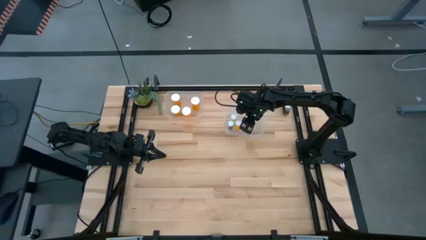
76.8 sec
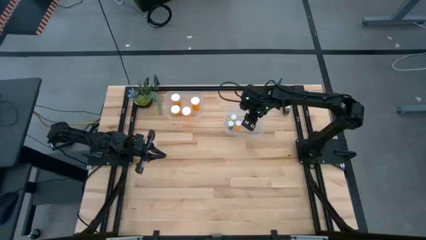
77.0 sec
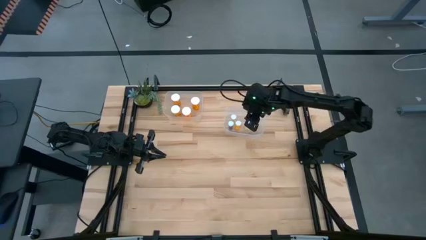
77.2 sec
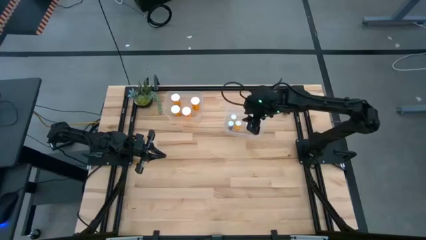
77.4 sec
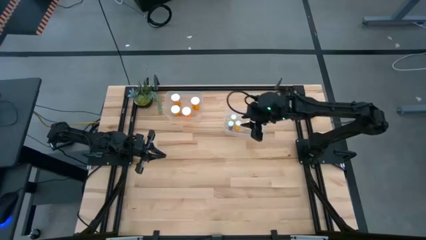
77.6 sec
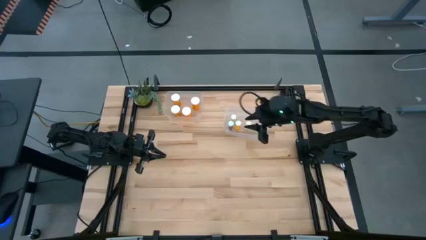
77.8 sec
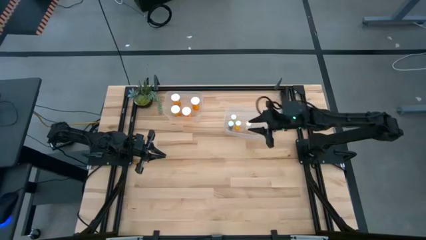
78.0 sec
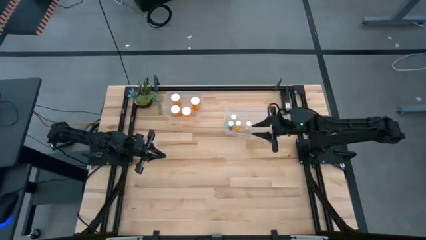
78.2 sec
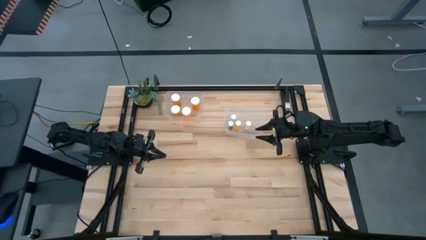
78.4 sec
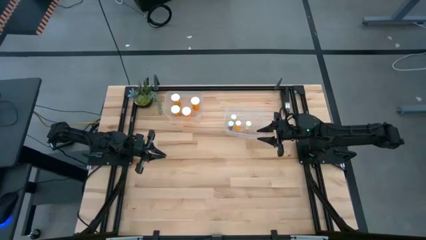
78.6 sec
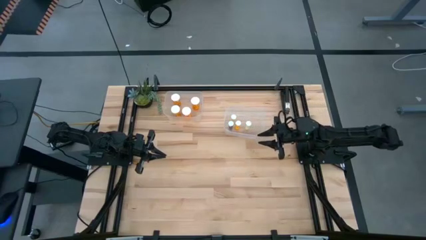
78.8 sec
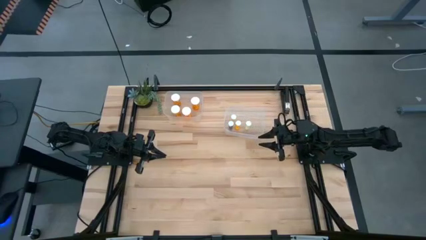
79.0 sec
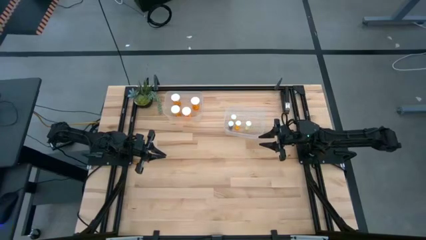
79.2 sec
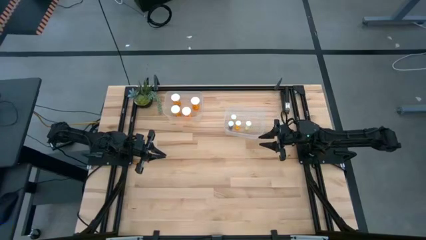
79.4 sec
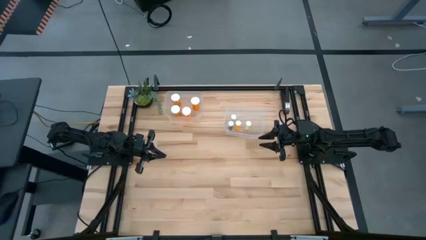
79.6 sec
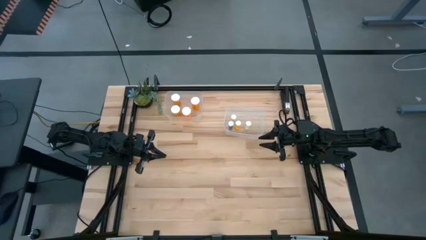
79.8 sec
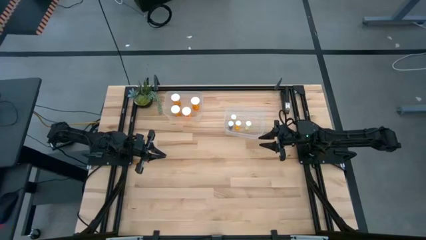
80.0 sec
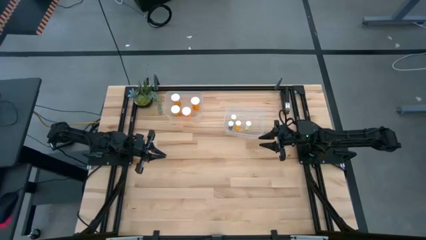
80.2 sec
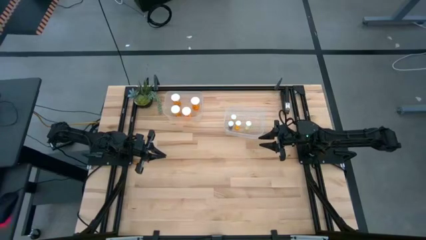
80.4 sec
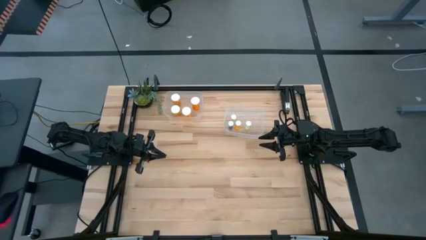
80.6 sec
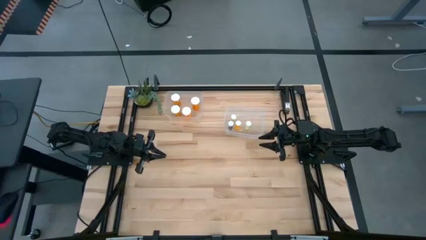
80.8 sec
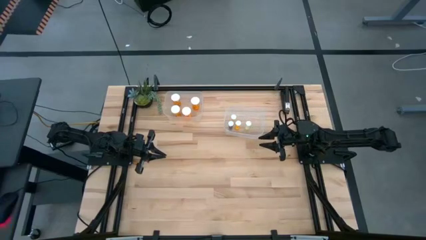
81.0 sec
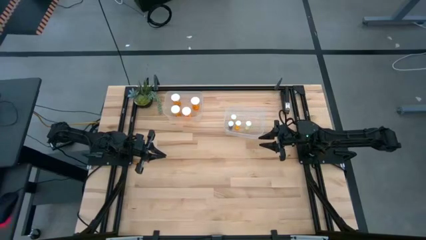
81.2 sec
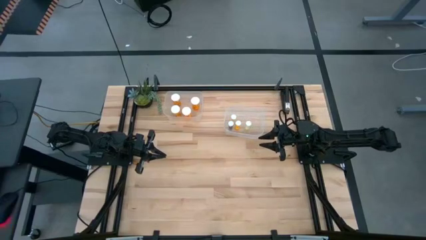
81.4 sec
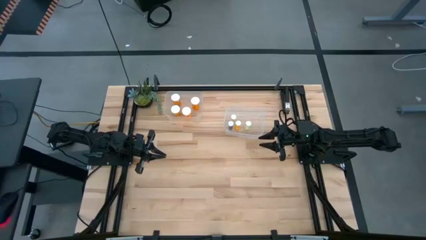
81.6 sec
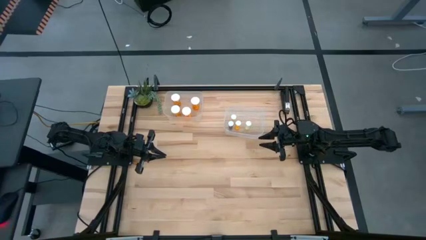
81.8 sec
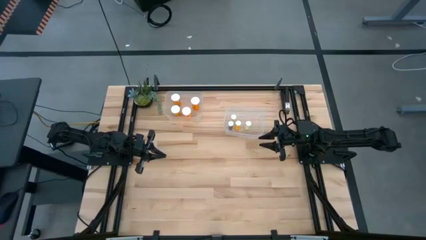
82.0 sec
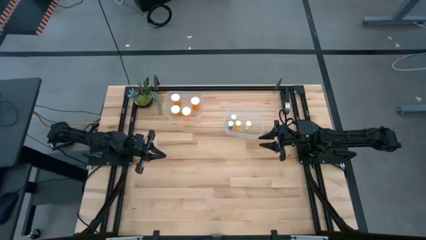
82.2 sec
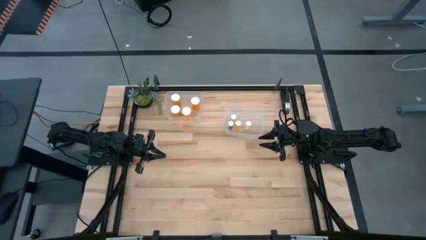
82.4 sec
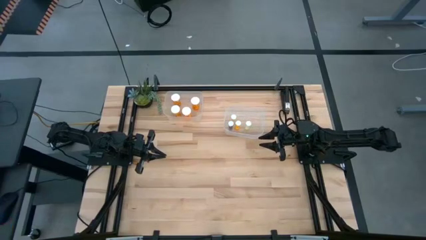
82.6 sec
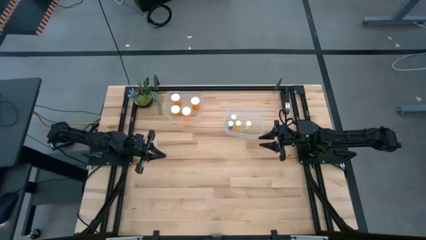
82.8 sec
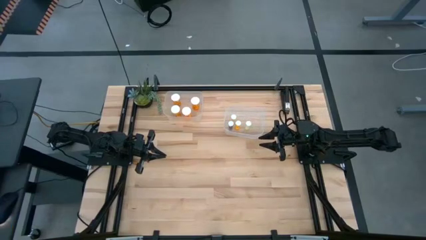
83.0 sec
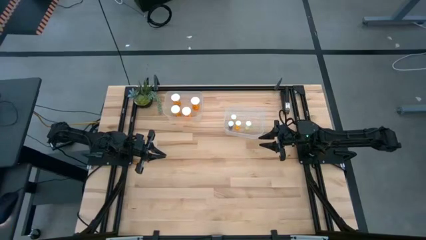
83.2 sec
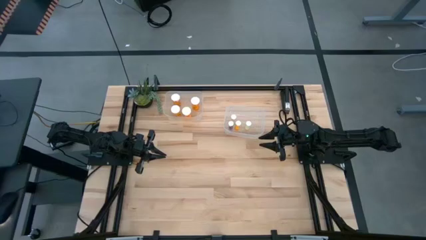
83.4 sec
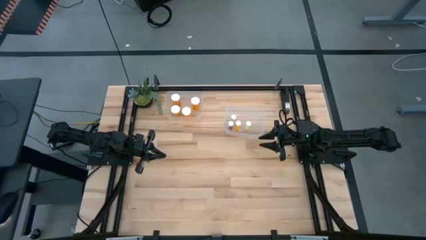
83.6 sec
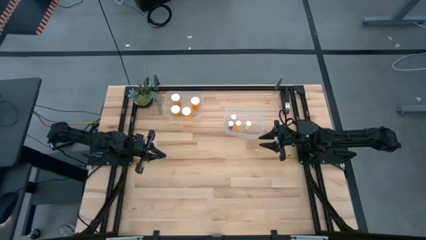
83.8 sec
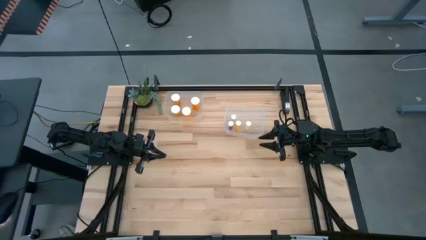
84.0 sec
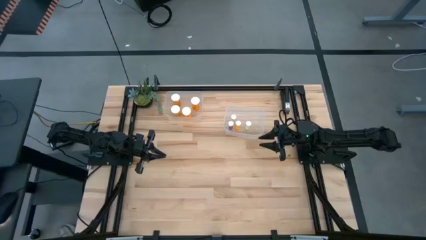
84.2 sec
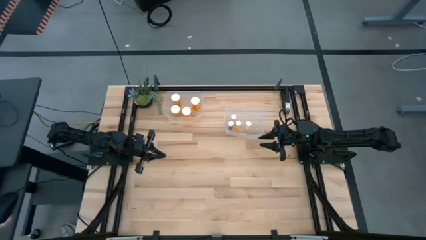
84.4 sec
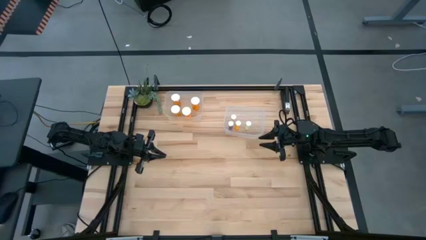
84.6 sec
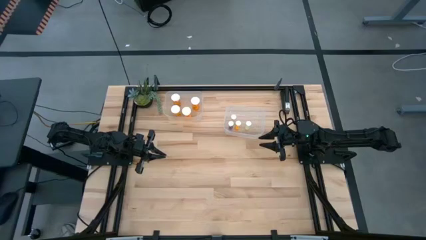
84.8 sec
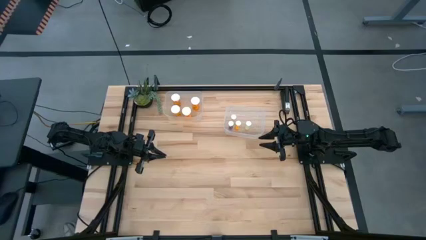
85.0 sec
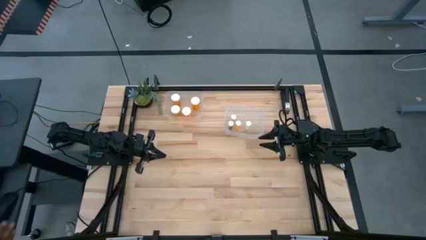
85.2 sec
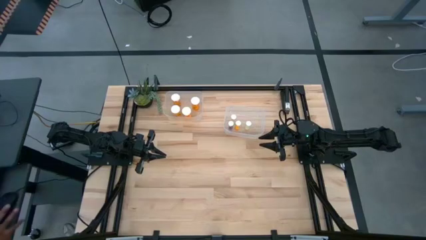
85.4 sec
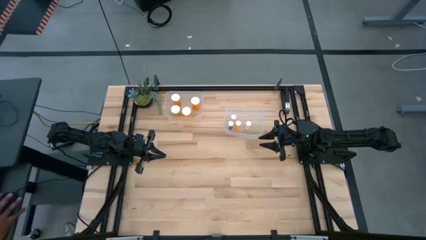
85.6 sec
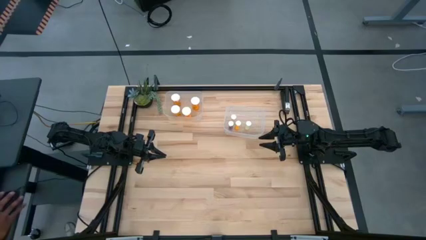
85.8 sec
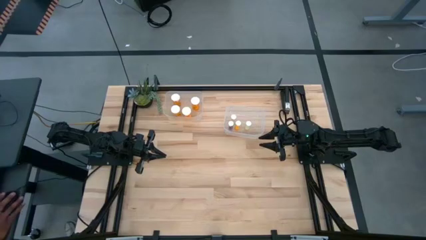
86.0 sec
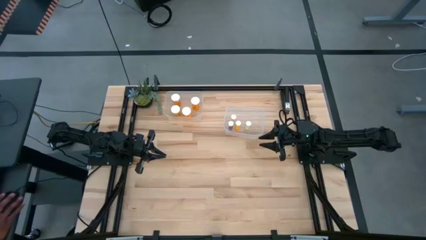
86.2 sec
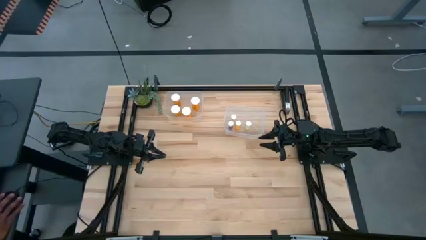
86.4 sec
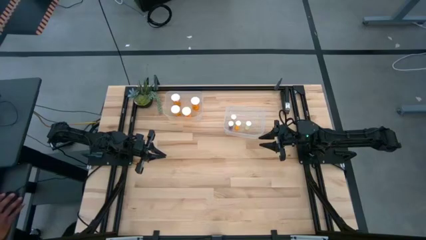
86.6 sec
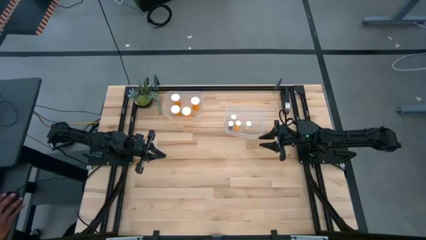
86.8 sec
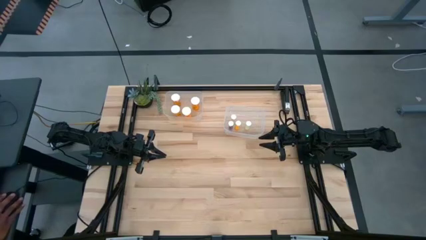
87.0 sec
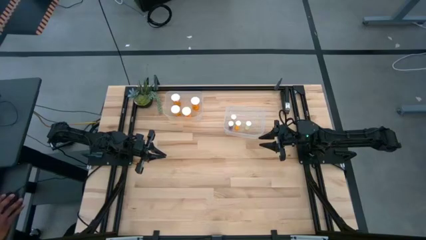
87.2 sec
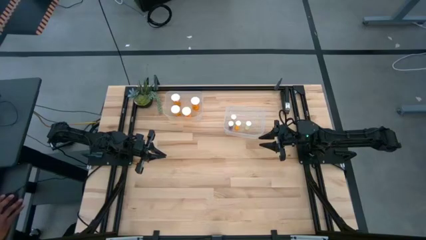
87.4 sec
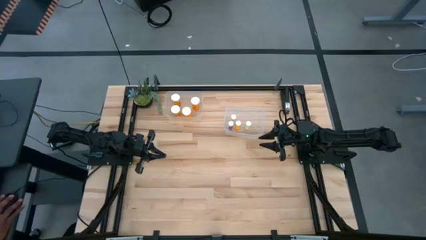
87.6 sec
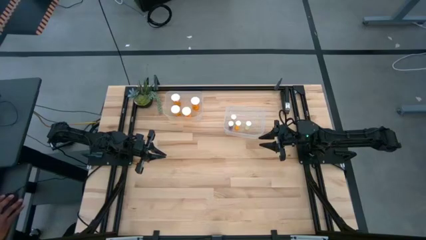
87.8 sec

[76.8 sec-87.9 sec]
Task: Pick and place medicine bottles into bin by pill shape (circle, oval)
Return to Home Position

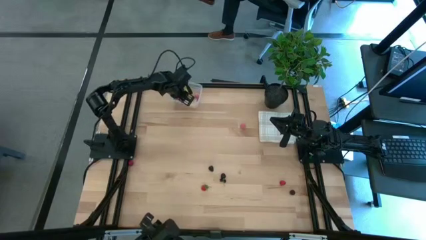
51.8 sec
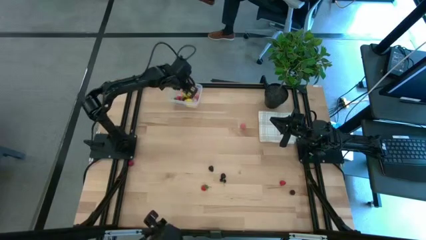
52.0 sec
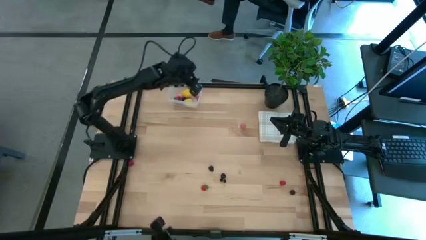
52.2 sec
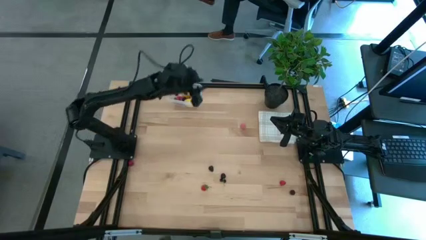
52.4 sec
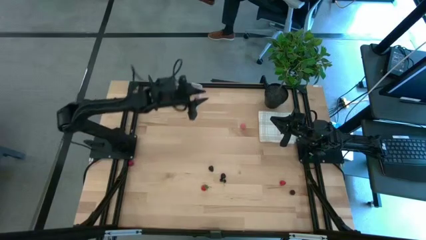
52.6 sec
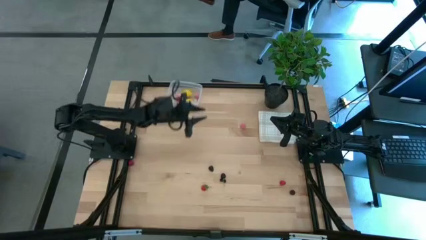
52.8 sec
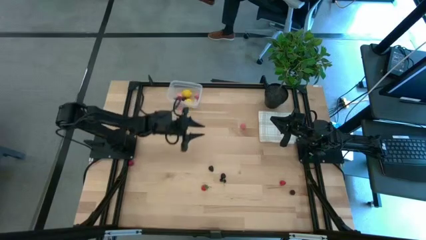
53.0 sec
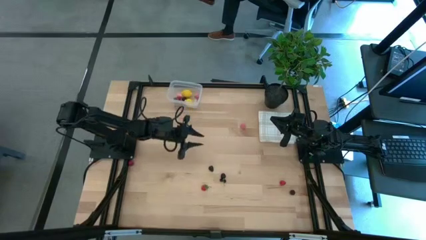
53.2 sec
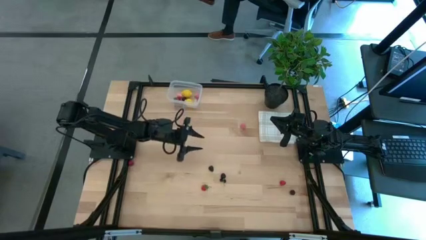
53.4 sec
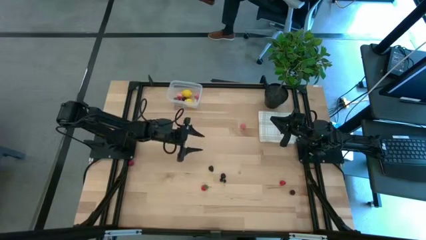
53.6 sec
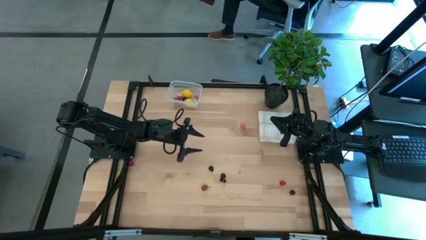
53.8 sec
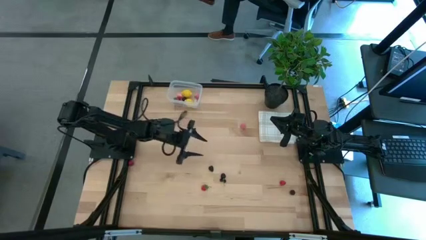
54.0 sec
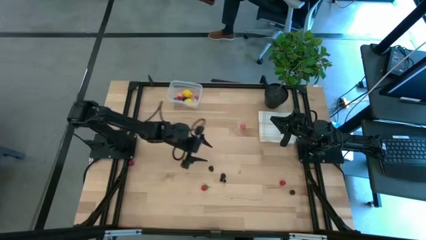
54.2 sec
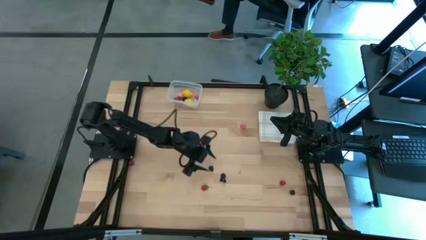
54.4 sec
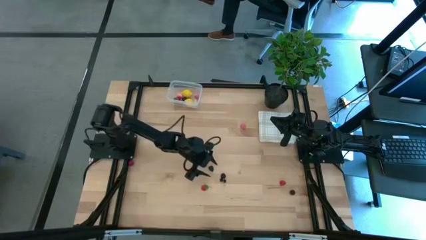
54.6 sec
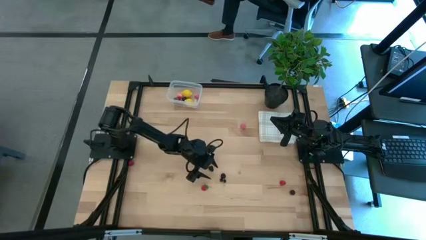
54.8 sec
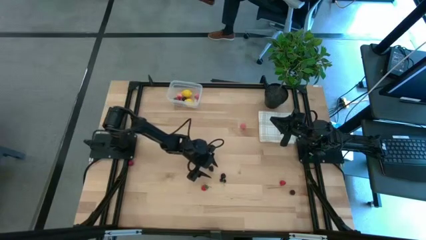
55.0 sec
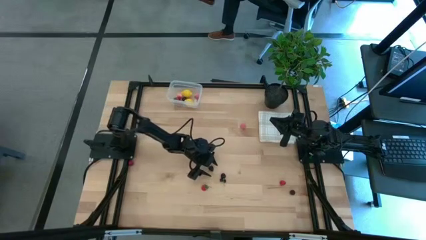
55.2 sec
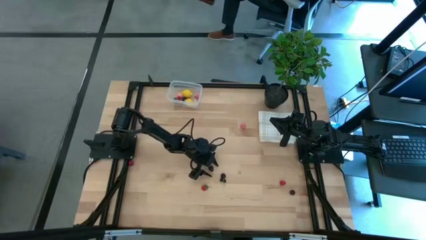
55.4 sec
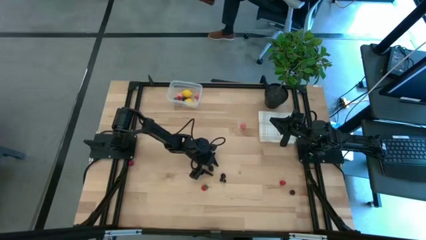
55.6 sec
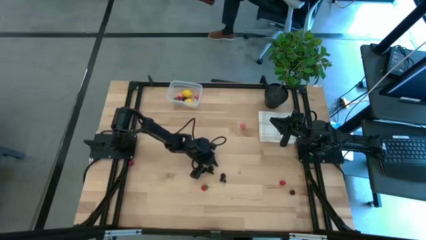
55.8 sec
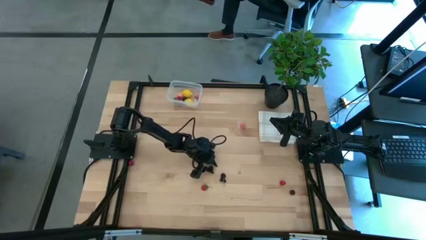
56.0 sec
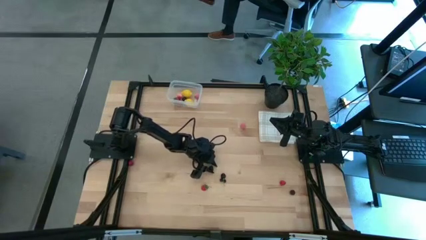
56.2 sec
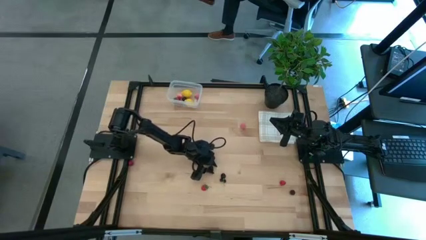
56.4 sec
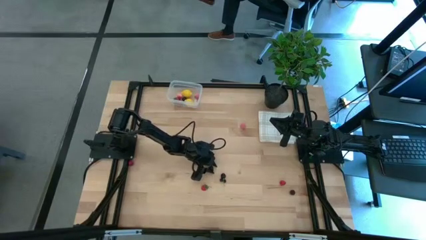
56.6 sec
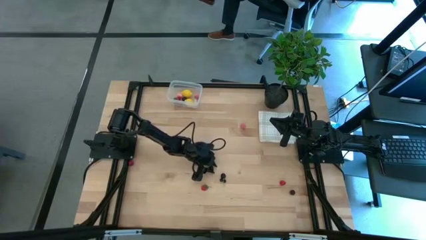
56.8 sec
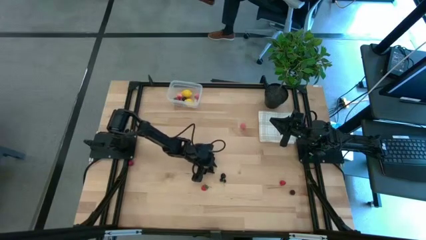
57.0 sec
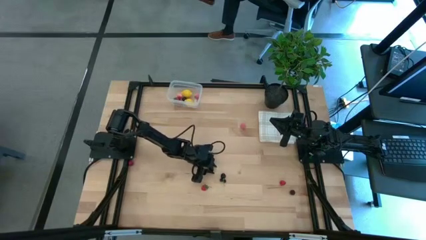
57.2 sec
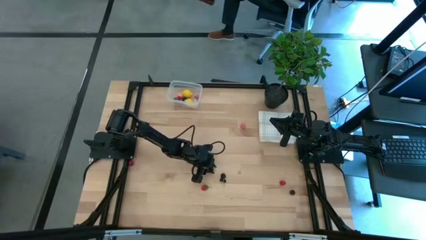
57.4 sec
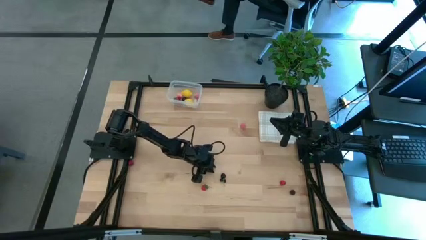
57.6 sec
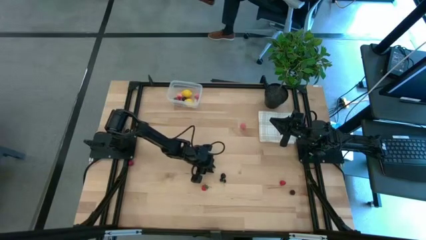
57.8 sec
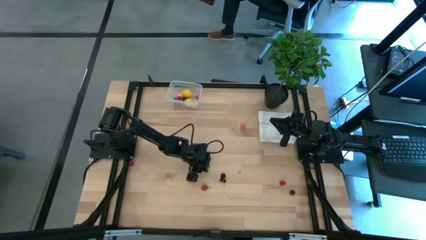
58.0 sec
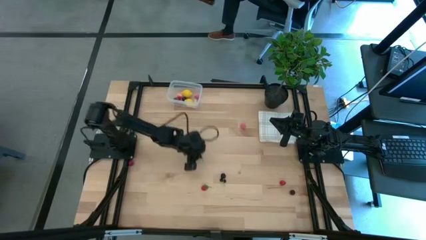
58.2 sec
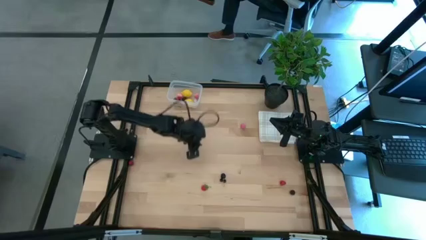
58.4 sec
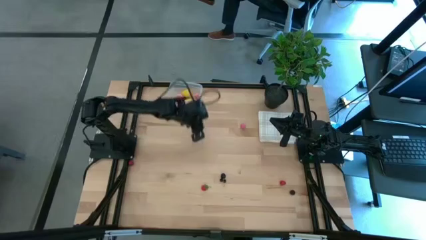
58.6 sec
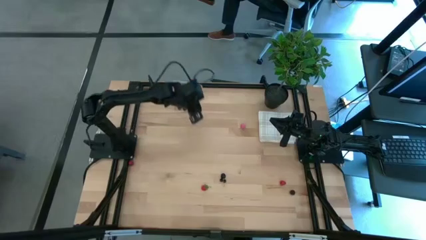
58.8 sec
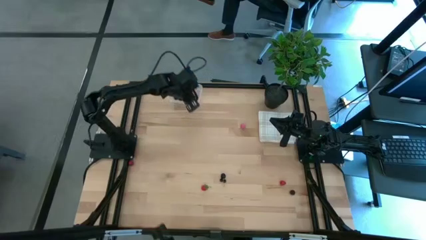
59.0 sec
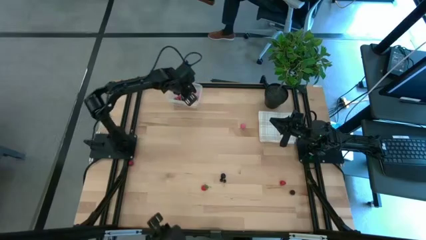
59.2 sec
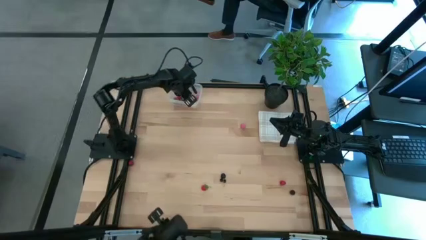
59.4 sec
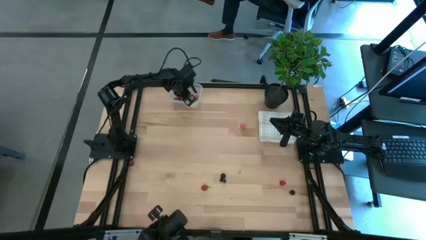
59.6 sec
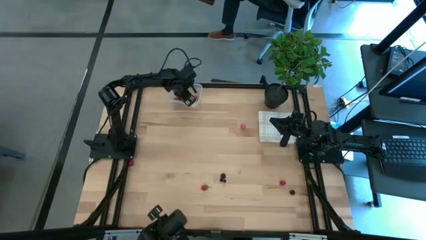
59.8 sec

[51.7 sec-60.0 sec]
Task: Pick and placing Produce into tupperware
Put the top blackberry into the transparent bin
